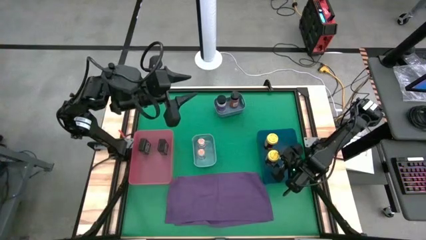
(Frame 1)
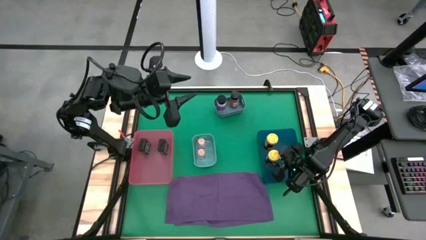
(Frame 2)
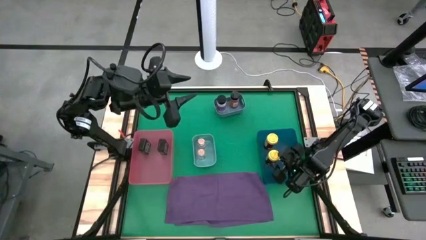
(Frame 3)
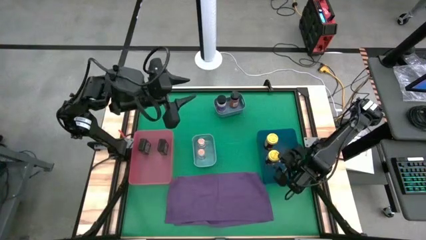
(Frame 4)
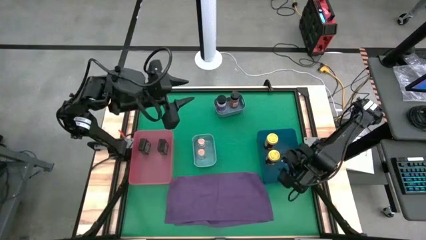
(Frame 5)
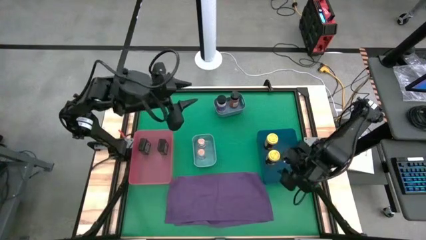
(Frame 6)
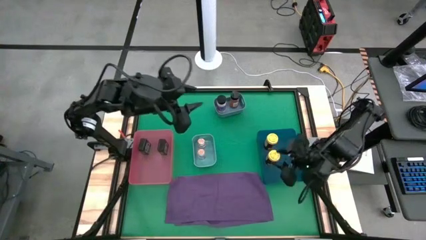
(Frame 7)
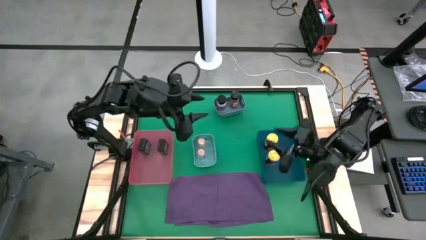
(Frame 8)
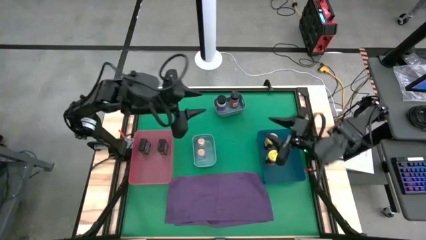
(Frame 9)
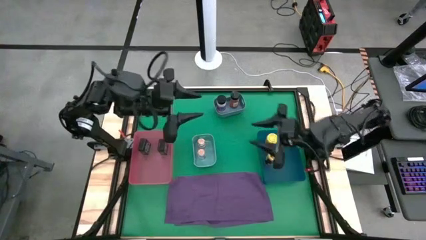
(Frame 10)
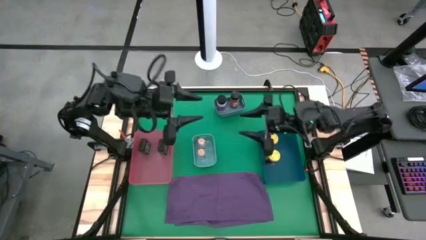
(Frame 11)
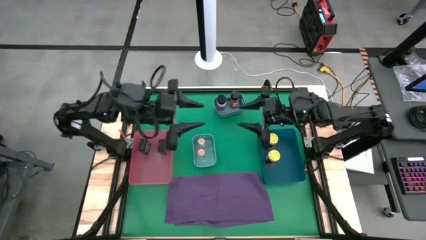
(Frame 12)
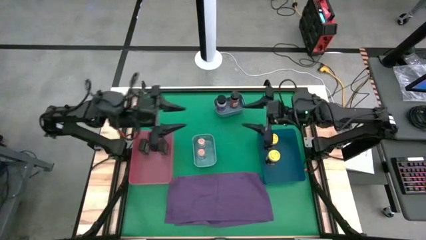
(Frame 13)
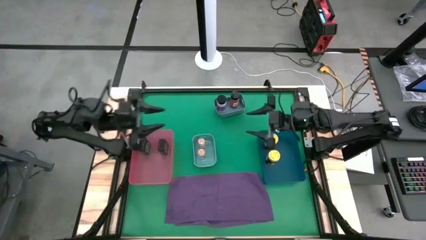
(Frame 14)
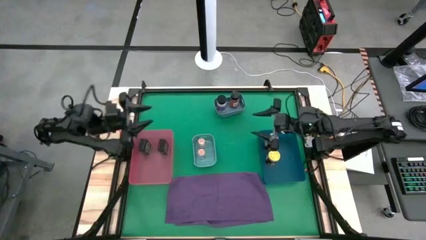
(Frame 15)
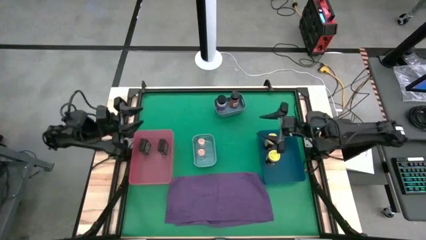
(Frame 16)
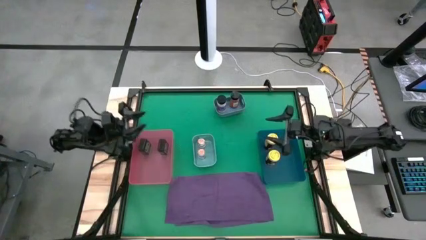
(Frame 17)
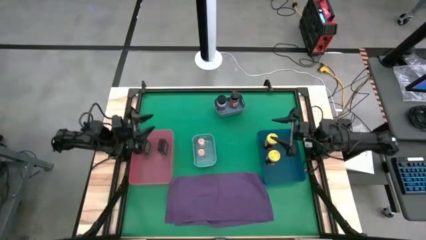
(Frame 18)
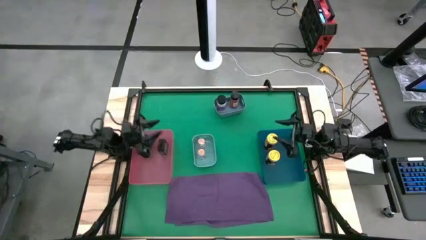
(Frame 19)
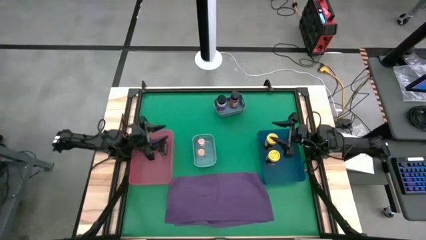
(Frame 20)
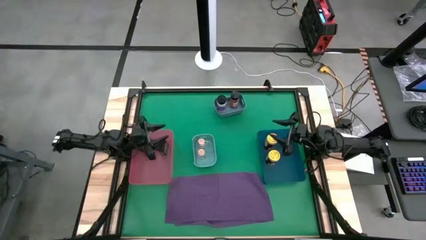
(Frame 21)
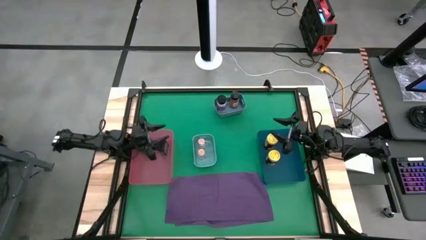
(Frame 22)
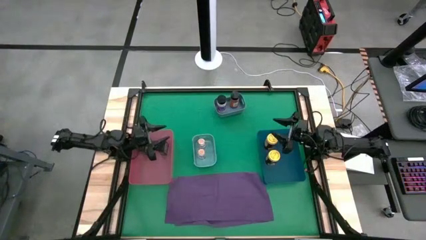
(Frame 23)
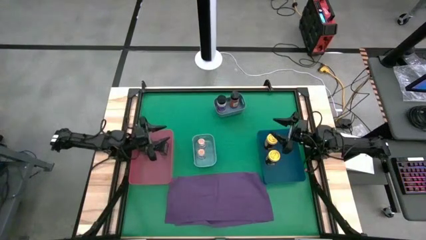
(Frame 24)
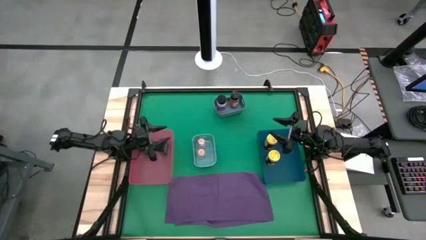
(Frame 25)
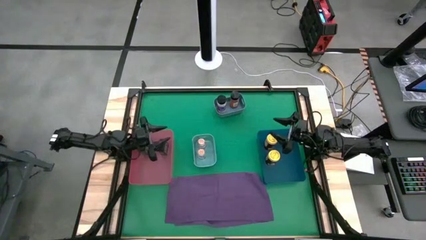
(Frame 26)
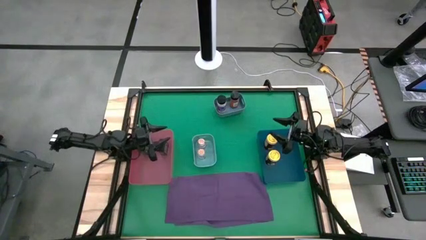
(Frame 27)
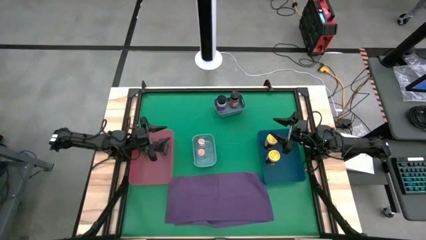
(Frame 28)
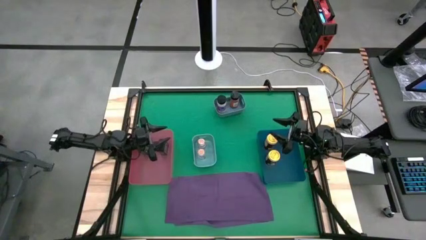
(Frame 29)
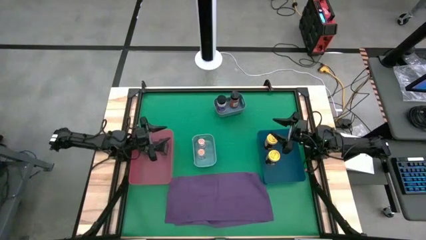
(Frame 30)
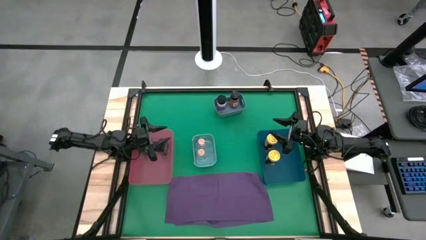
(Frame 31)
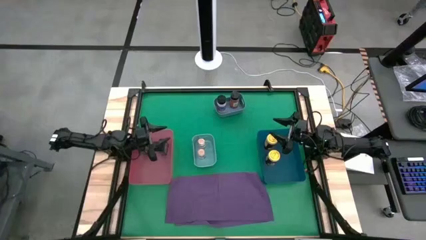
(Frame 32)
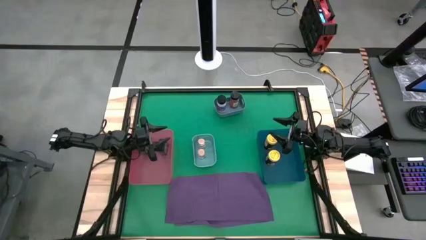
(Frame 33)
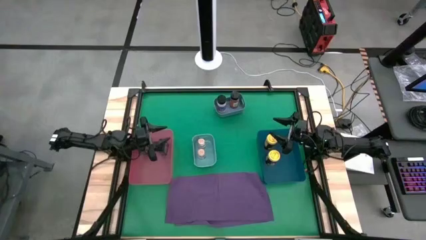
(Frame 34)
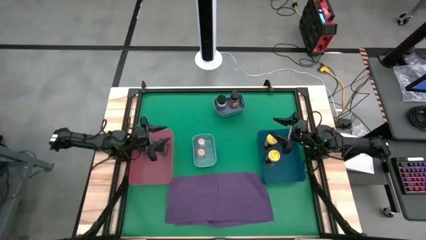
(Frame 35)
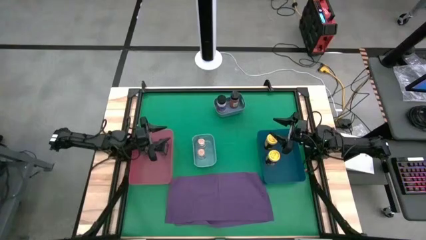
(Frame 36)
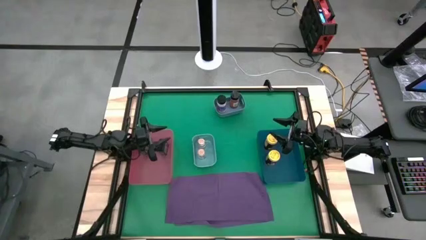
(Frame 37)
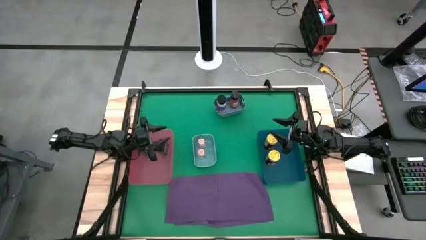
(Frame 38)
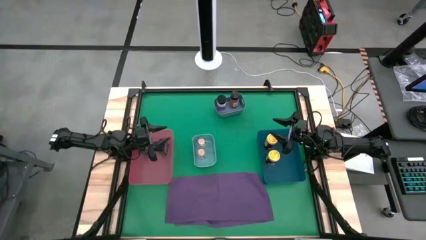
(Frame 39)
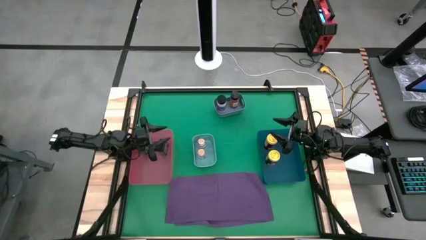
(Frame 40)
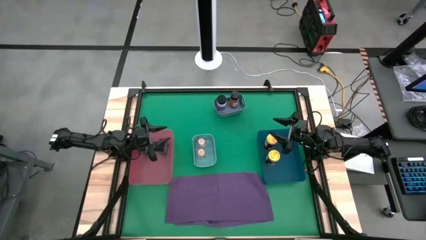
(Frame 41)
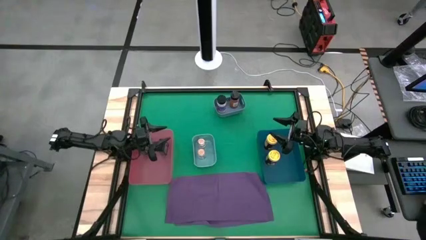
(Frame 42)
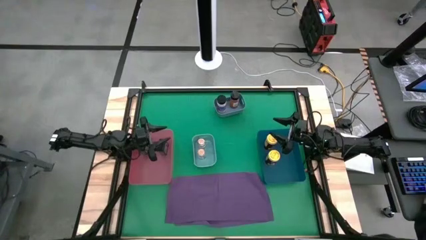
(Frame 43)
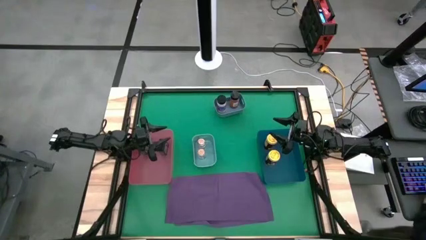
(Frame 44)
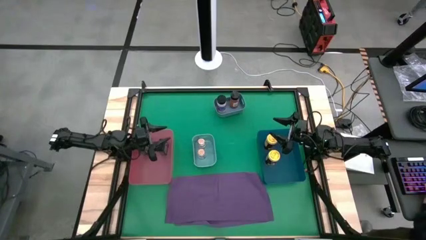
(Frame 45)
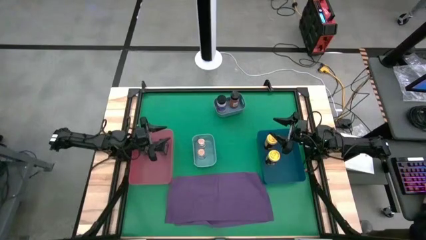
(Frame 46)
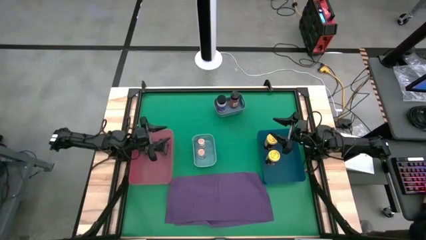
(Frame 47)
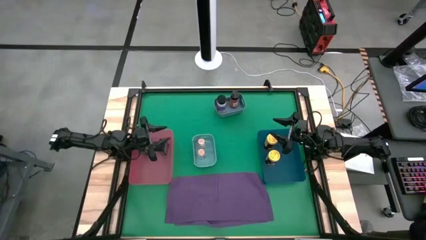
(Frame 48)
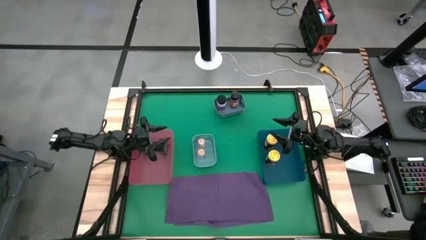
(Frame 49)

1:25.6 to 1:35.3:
Task: Sort spices by type
Return to Home Position

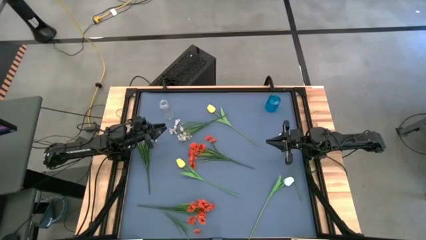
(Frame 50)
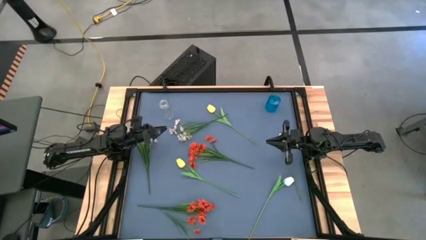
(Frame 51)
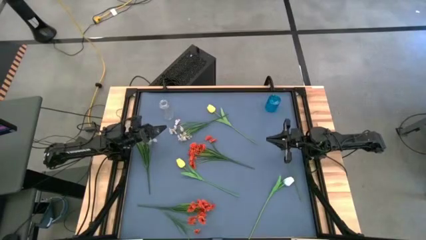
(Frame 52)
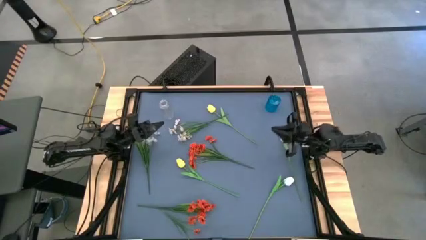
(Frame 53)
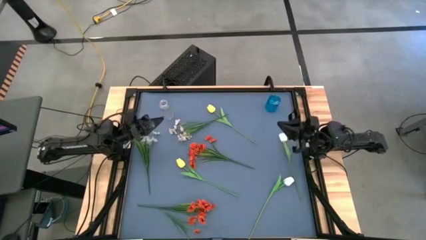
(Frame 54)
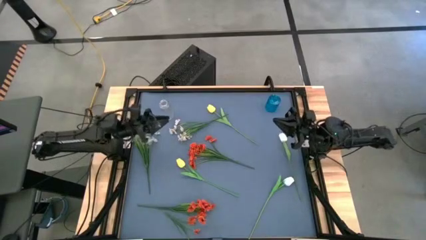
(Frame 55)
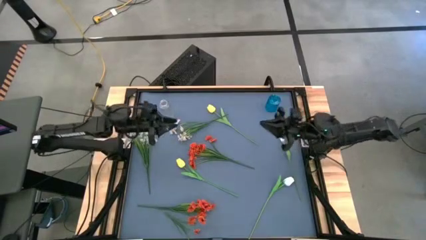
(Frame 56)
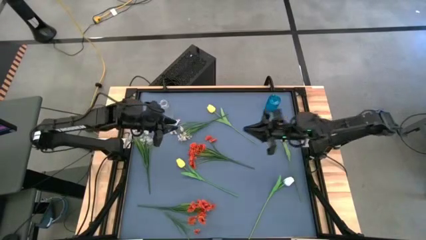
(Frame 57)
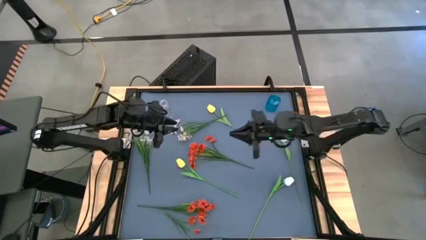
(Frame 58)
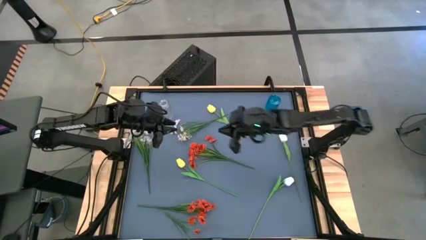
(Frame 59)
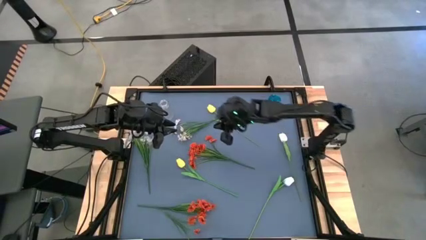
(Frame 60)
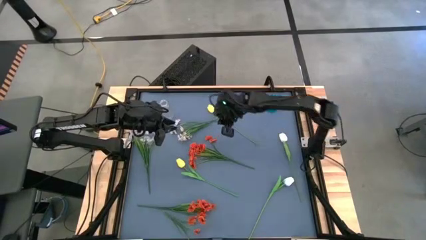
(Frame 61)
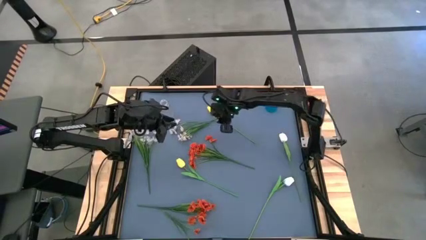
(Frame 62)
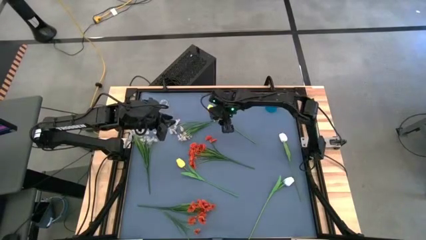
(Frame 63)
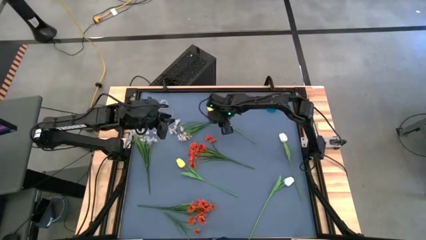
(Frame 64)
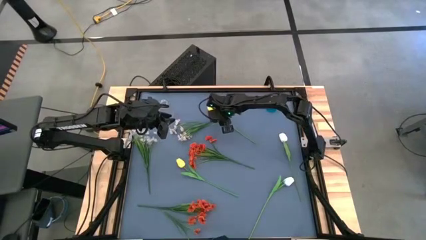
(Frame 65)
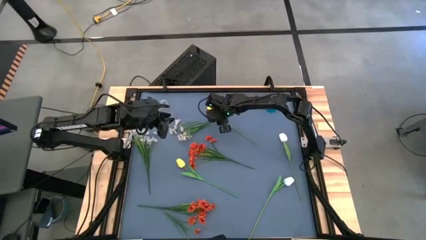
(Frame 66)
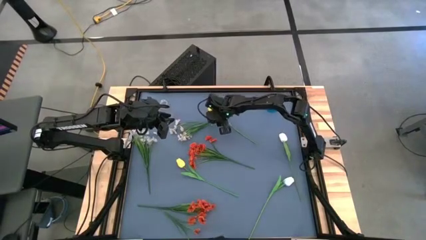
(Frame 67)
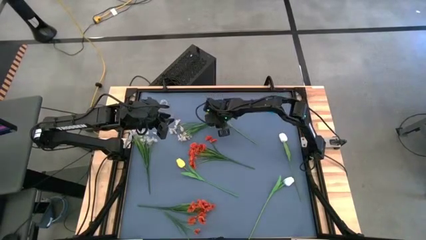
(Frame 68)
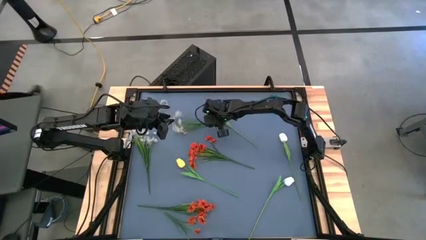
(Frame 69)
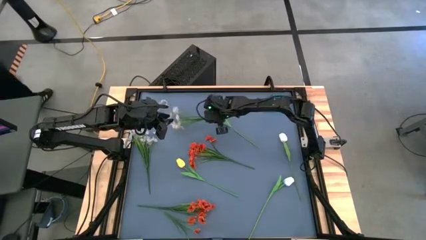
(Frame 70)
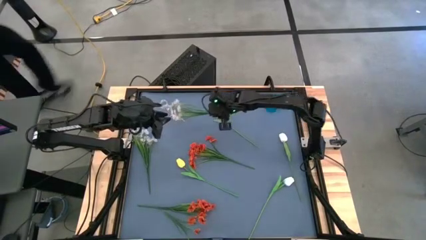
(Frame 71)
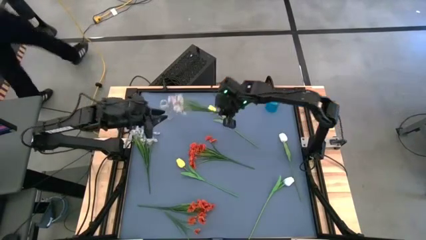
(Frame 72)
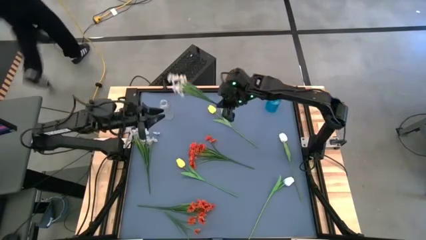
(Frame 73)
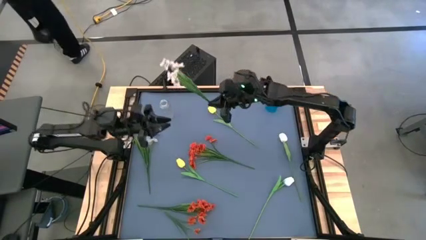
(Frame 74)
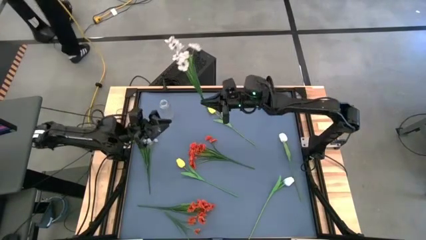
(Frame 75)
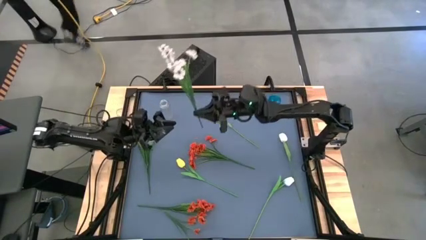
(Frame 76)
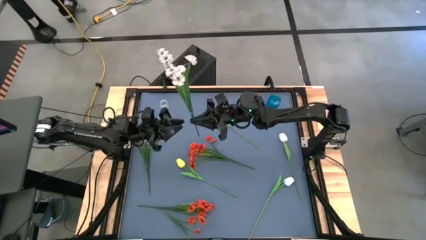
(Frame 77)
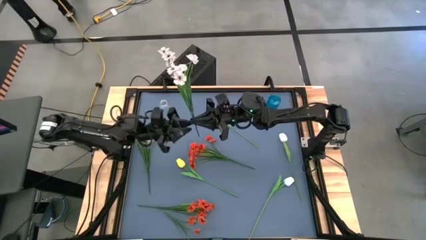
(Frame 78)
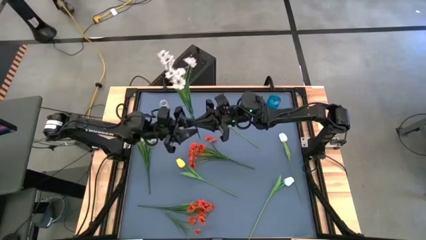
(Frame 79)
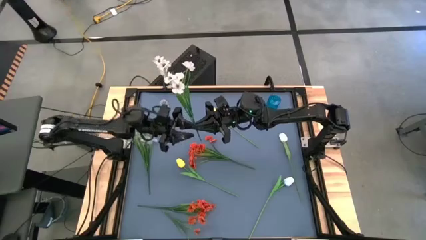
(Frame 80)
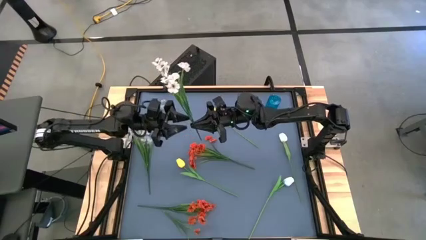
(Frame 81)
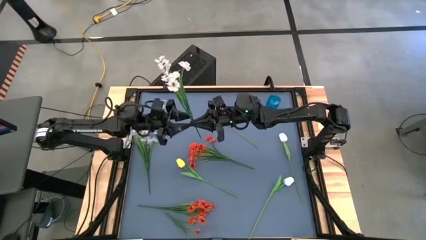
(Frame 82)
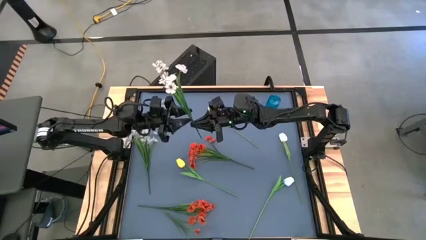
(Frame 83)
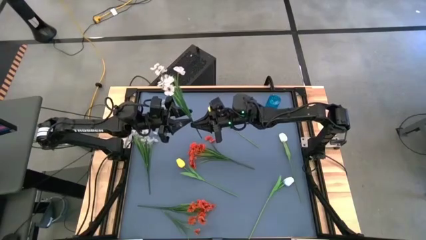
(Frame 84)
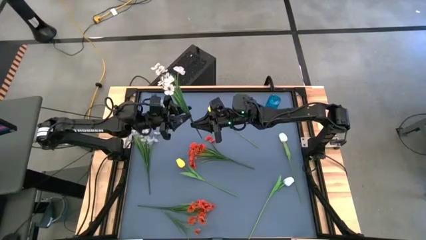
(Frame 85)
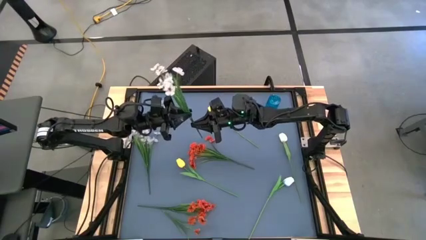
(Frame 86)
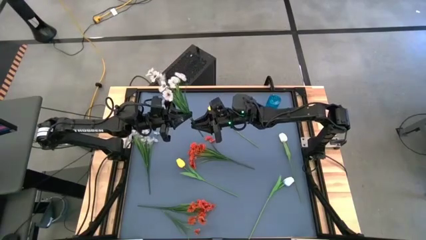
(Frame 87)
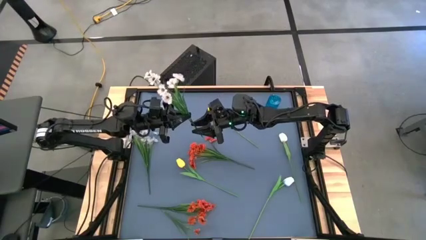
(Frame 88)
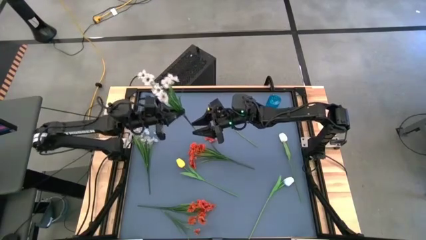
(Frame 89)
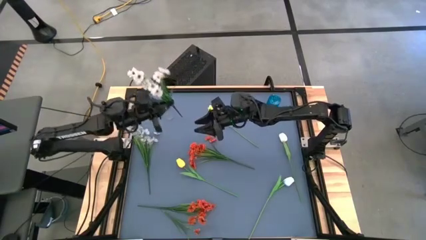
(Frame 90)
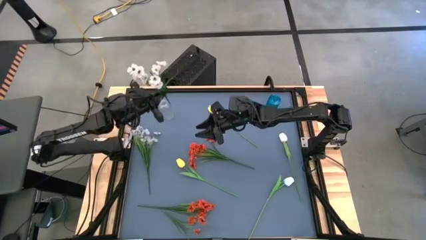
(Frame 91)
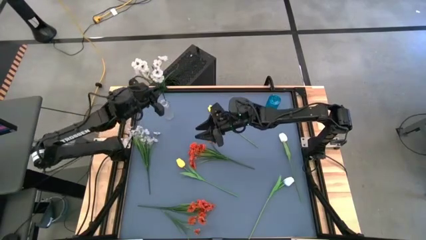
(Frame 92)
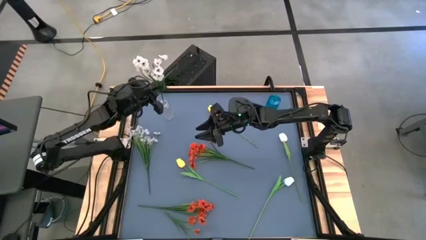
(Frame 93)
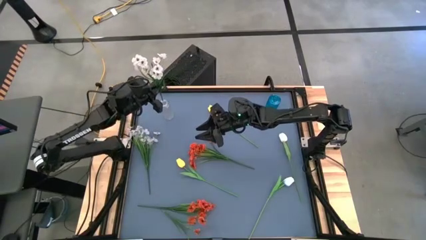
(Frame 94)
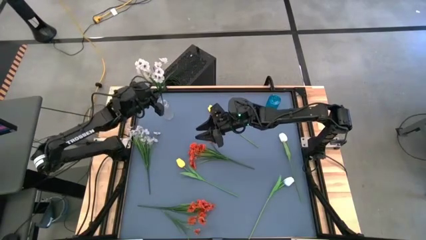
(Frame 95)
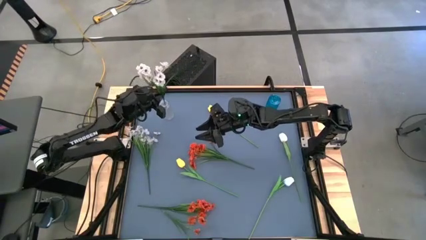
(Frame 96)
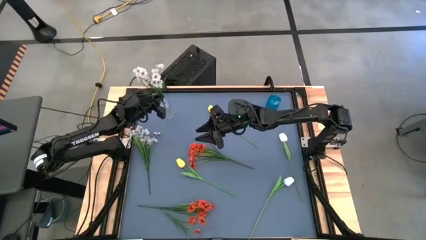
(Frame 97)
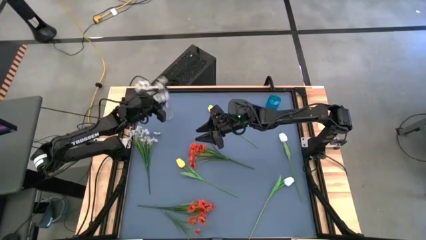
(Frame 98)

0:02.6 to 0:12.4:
Task: Sort flowers into vase by color
Put the right white flowers into the transparent vase
